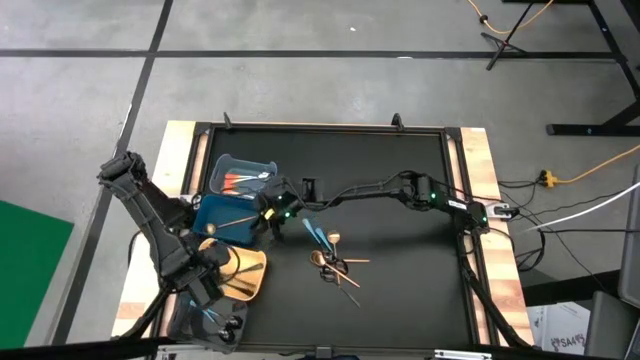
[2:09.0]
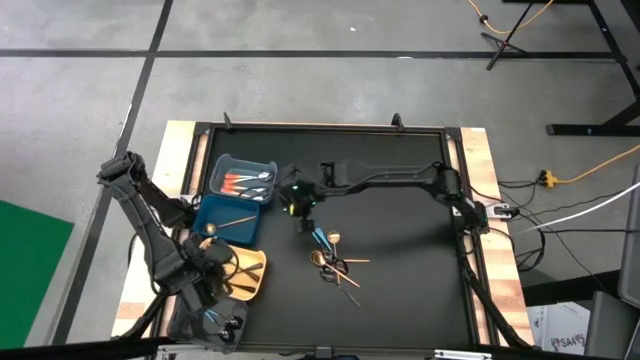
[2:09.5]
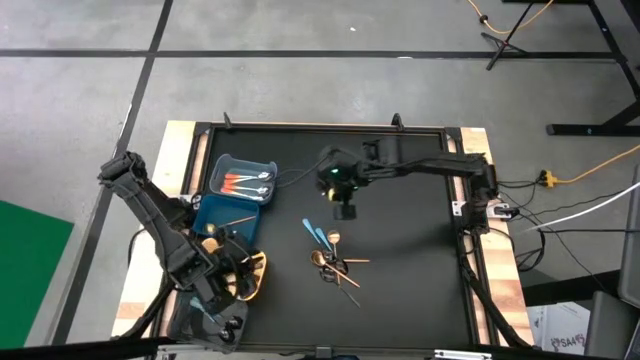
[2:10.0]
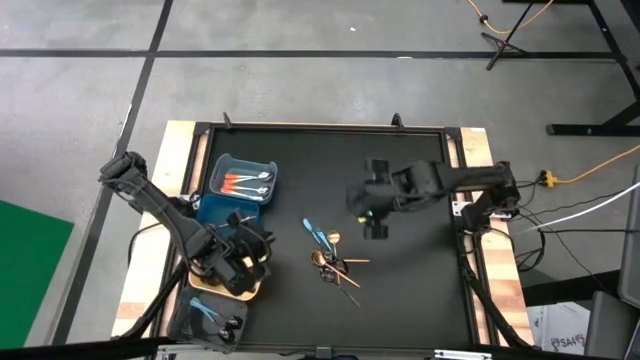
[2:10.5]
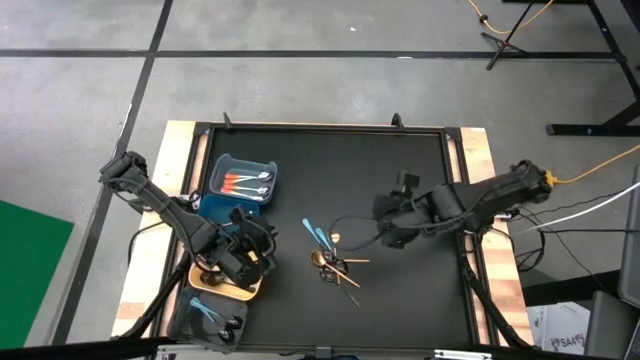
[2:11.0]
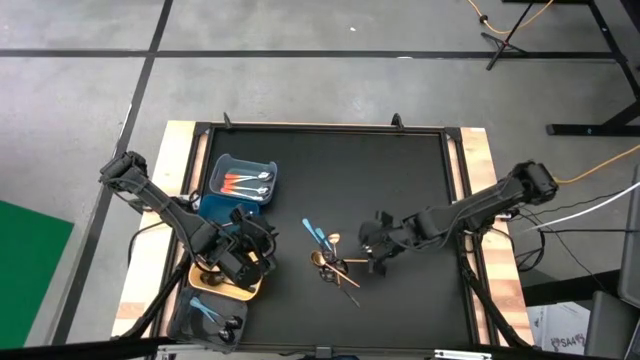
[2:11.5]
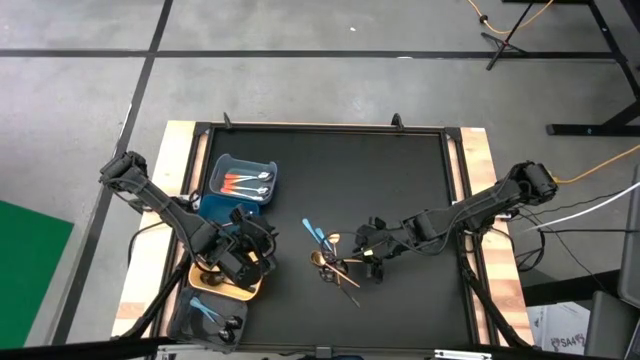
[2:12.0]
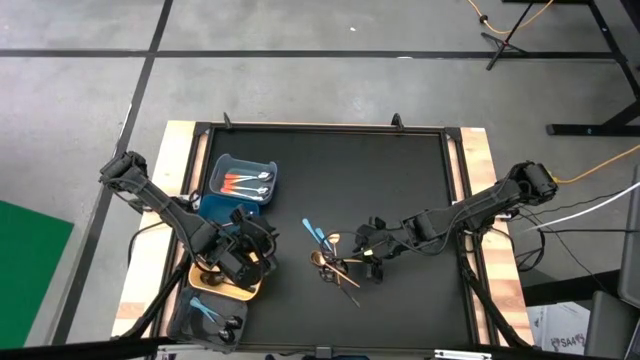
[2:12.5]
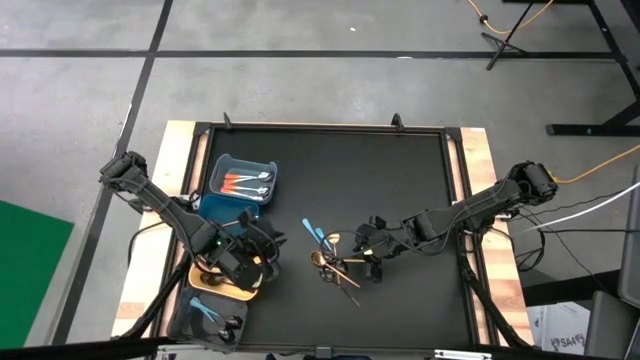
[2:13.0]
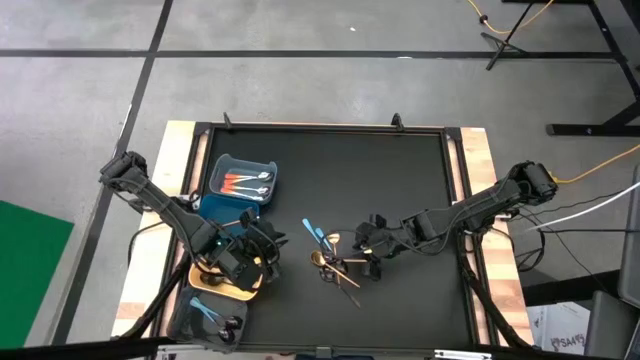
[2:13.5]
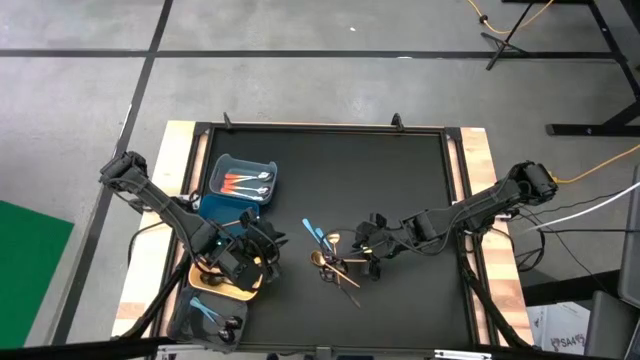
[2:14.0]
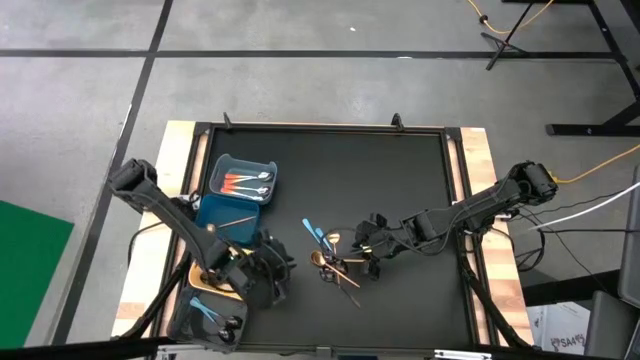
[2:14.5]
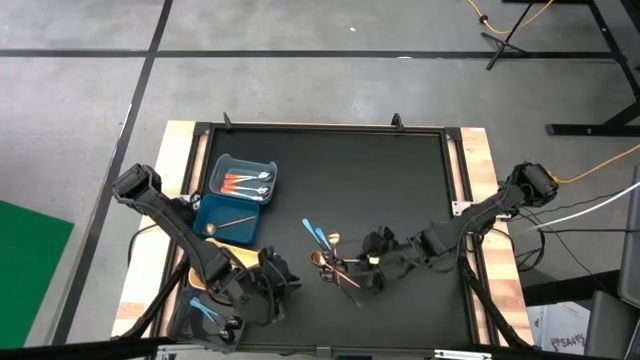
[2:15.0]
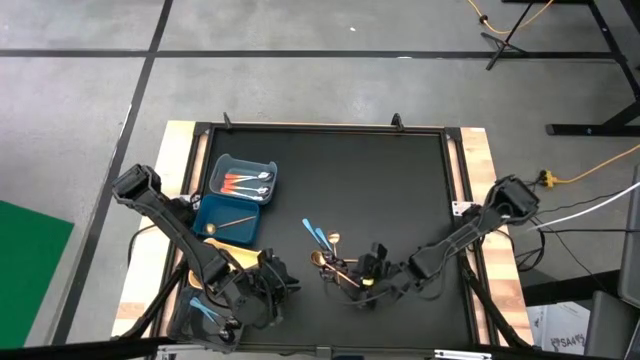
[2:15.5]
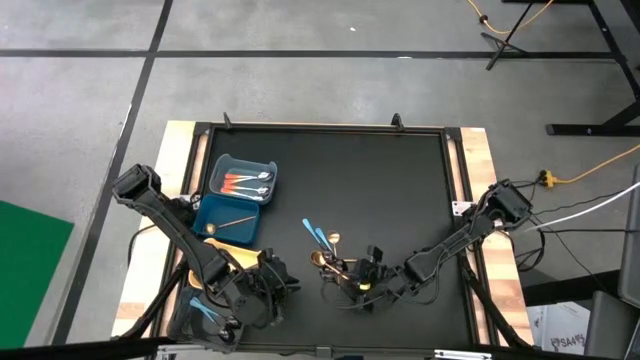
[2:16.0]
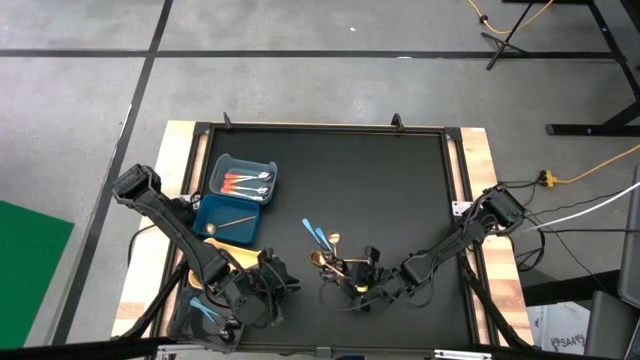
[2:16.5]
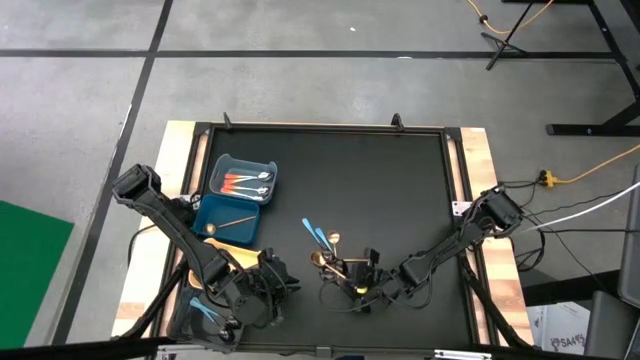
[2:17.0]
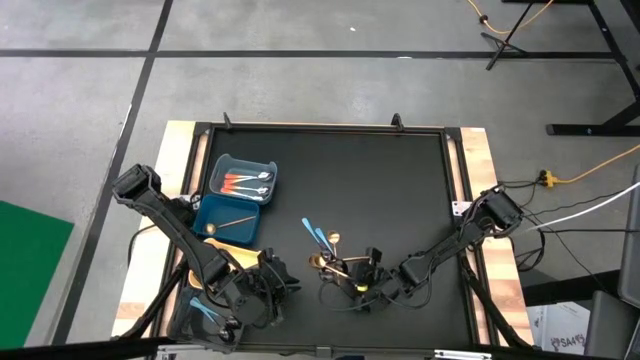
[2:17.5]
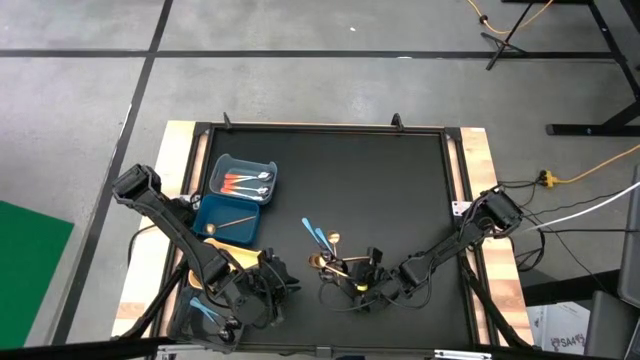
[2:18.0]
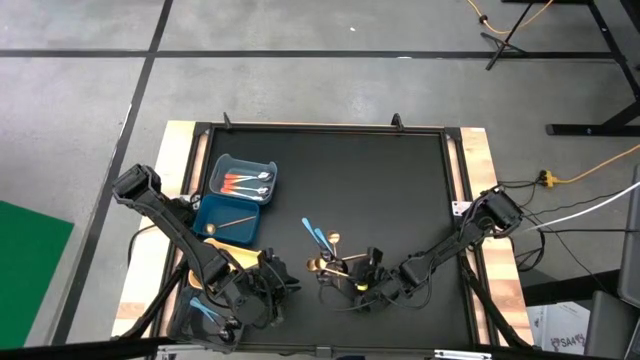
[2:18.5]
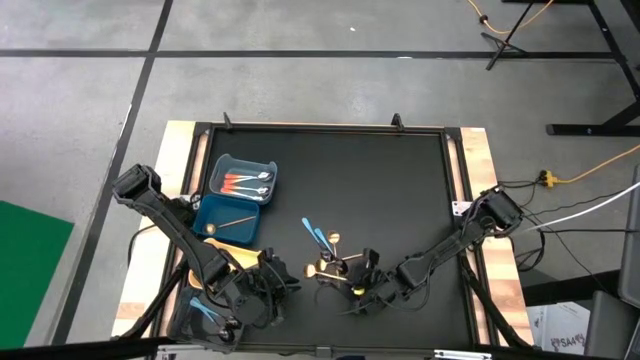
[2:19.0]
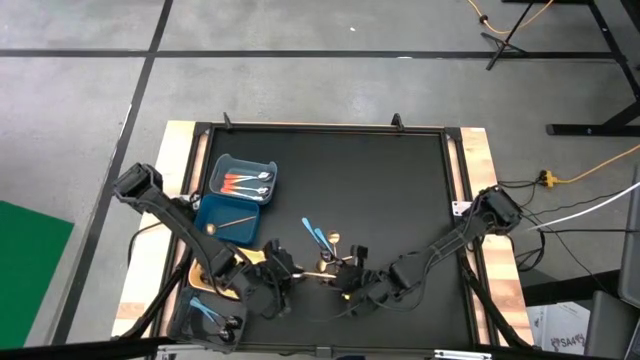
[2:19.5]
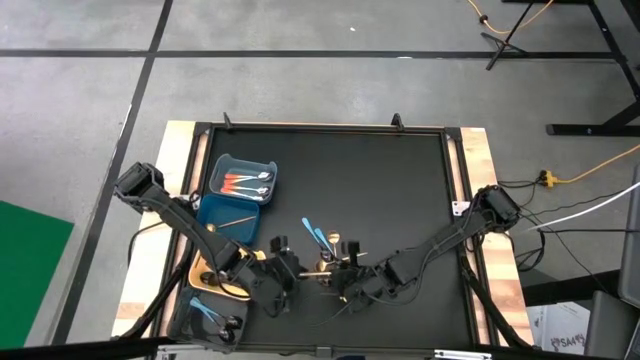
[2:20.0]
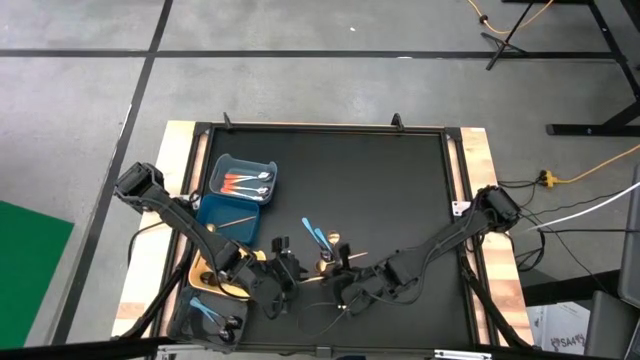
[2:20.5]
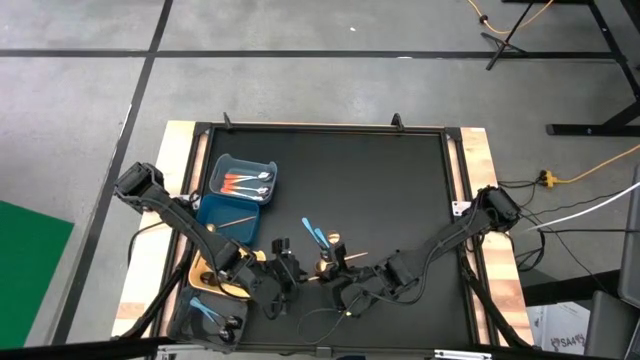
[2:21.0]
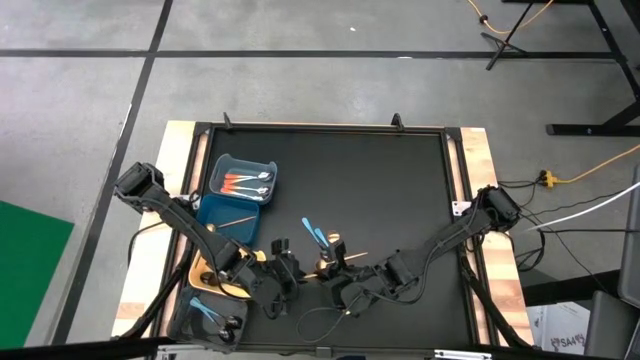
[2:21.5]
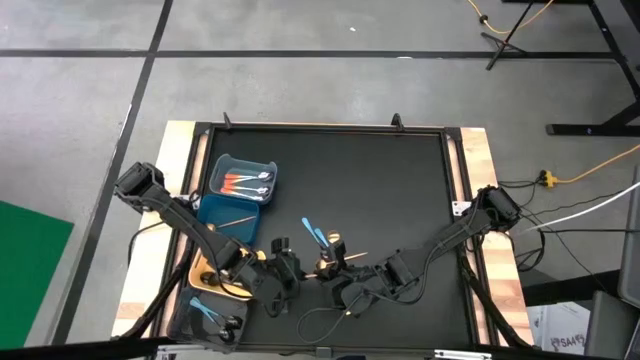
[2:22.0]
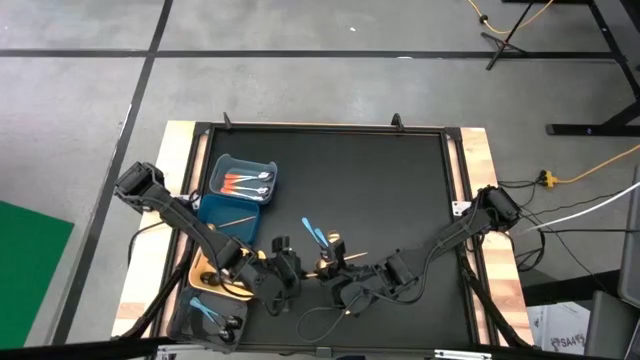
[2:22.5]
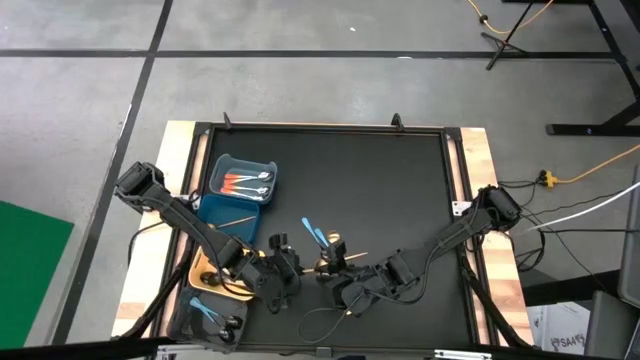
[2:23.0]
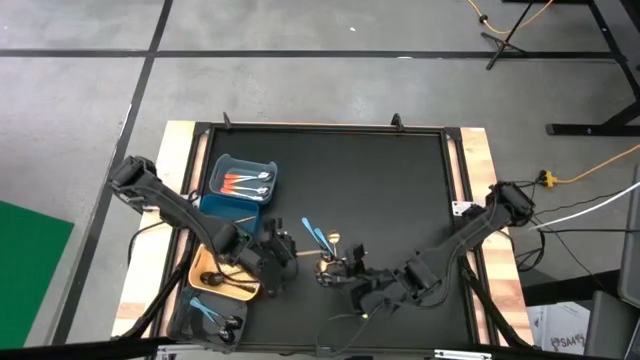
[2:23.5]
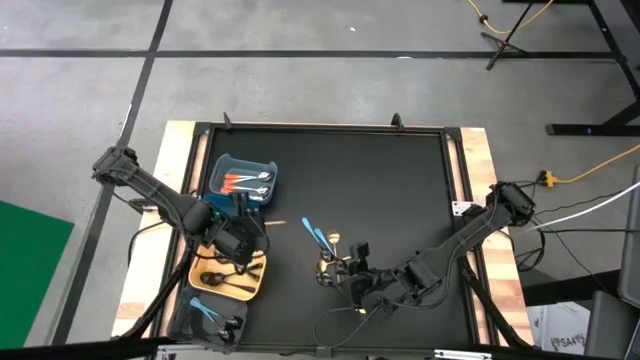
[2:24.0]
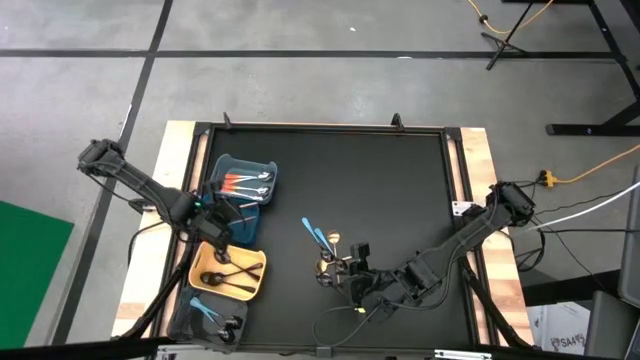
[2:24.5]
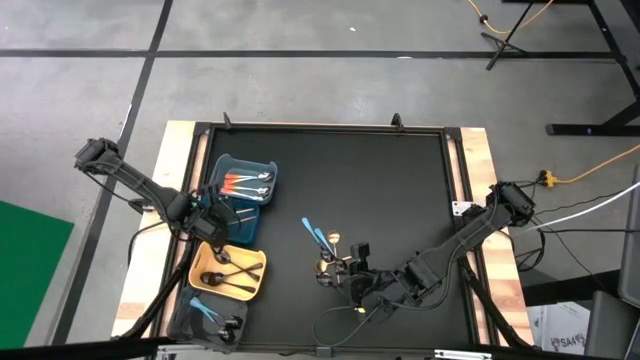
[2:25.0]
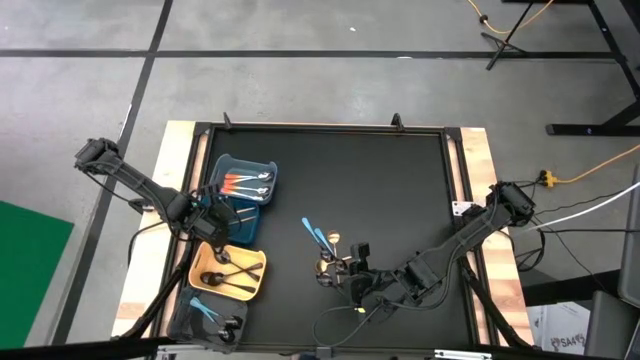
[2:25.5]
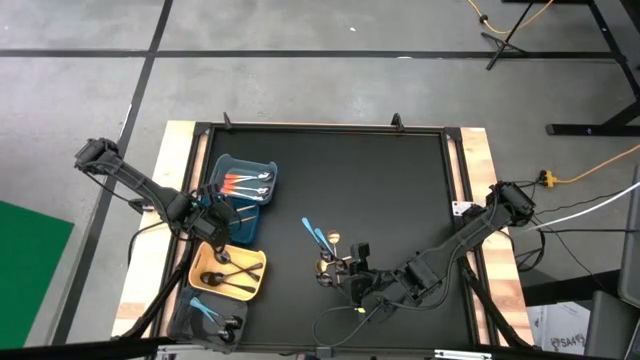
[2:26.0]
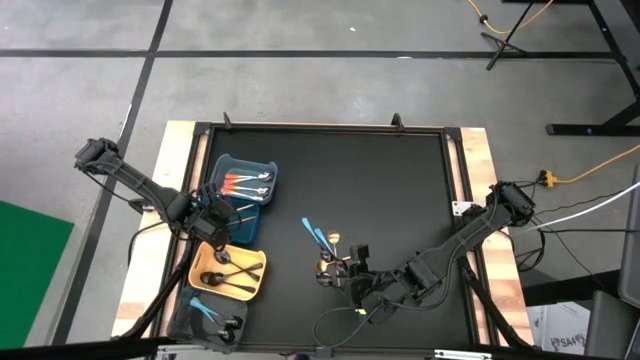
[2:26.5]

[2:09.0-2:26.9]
Task: Sort silverware by color (type)
Put the gold spoon into the blue bin

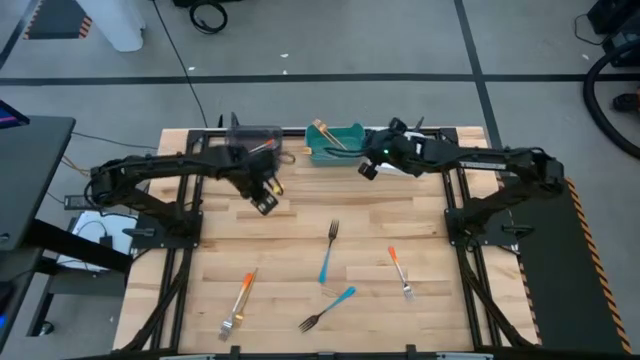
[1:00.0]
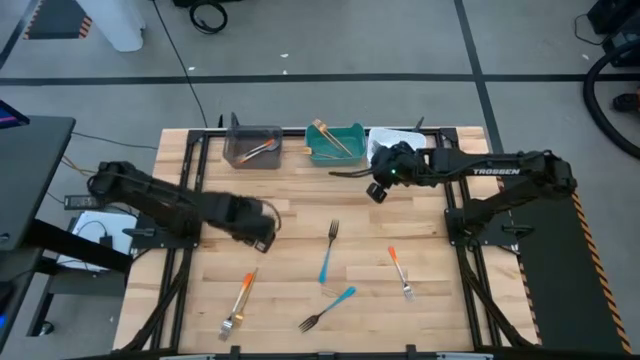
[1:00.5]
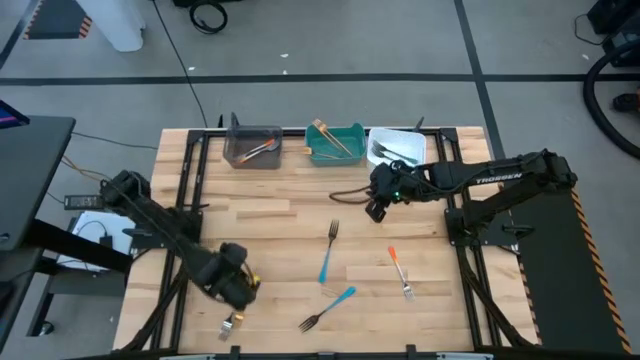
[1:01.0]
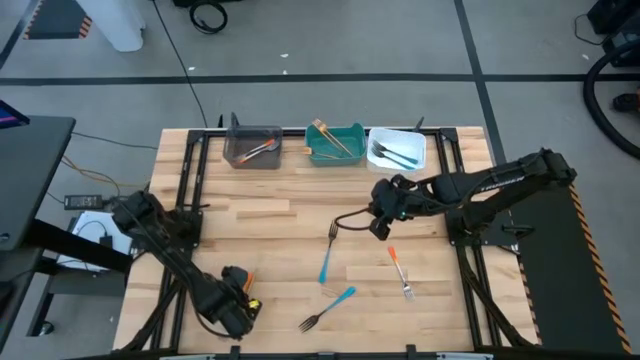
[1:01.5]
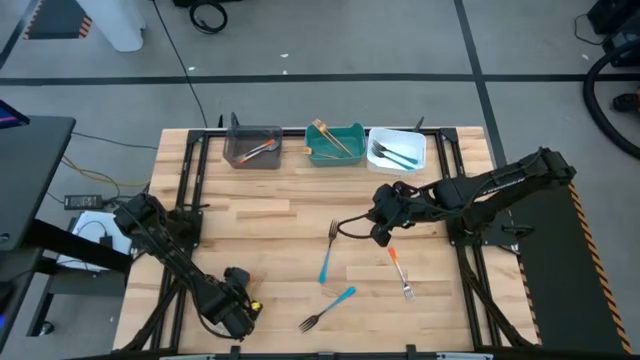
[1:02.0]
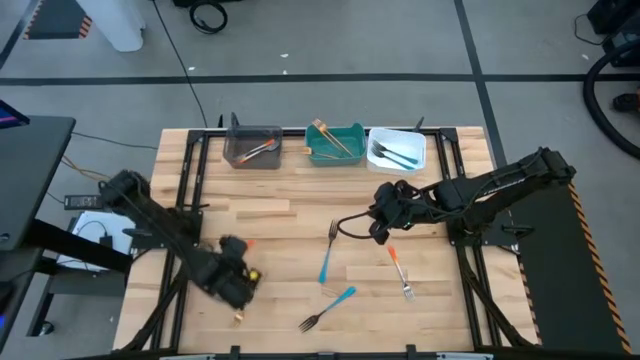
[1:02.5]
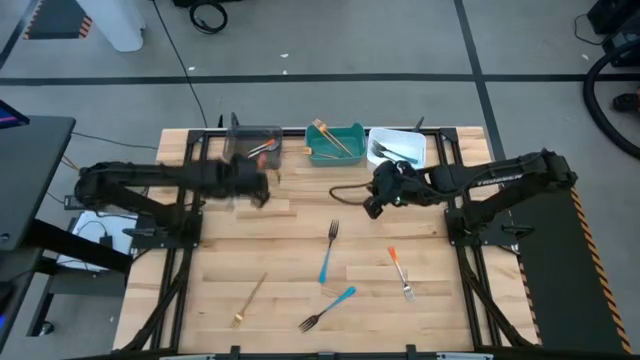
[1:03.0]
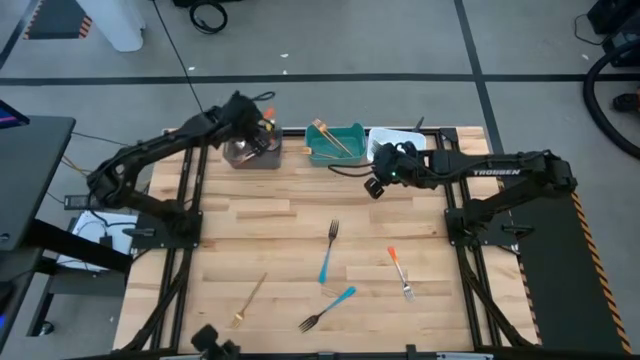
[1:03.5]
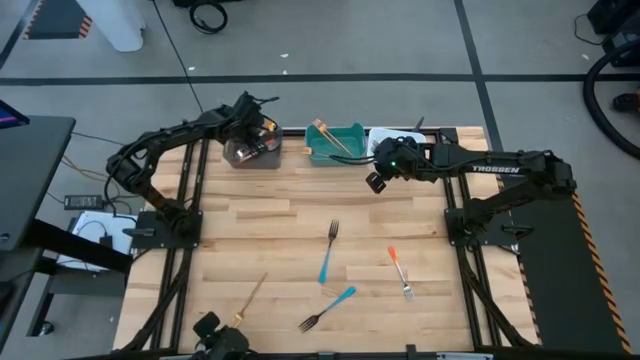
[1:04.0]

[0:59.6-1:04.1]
Task: Sort silverware by color (type)
Put the left orange fork into the black transparent bin
